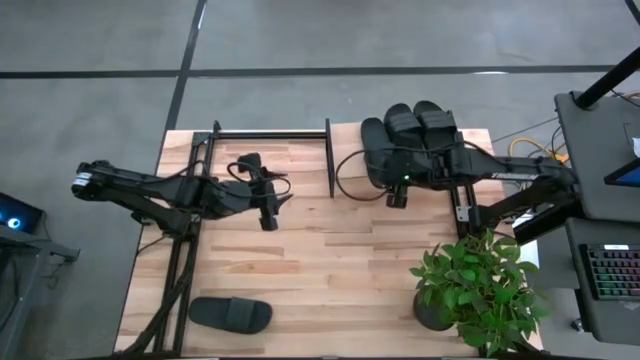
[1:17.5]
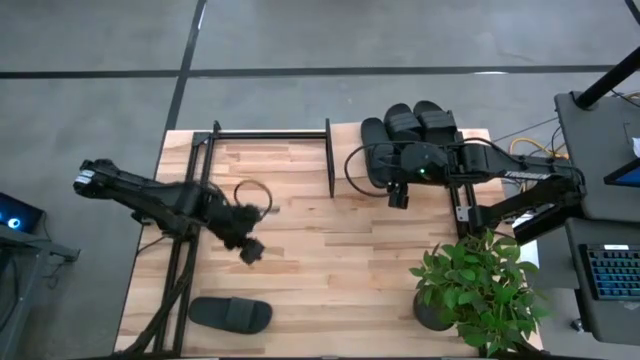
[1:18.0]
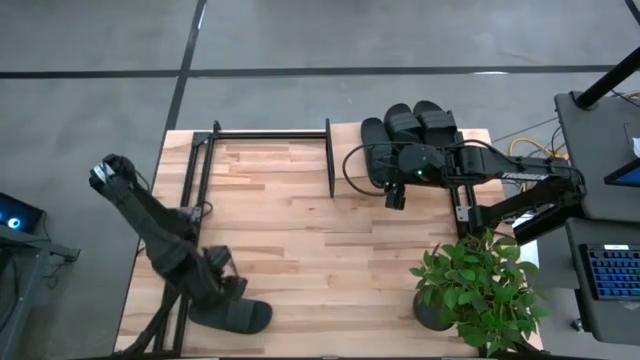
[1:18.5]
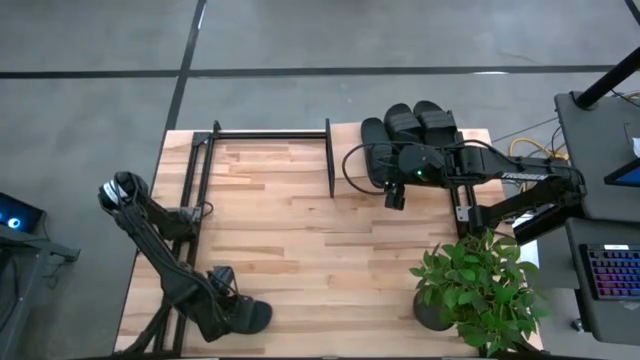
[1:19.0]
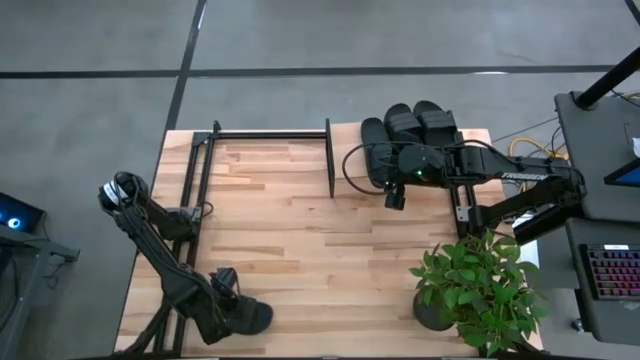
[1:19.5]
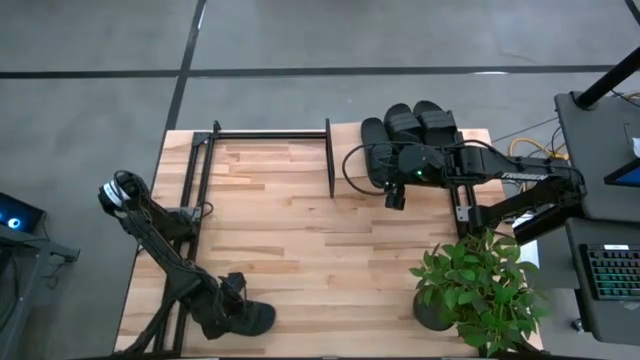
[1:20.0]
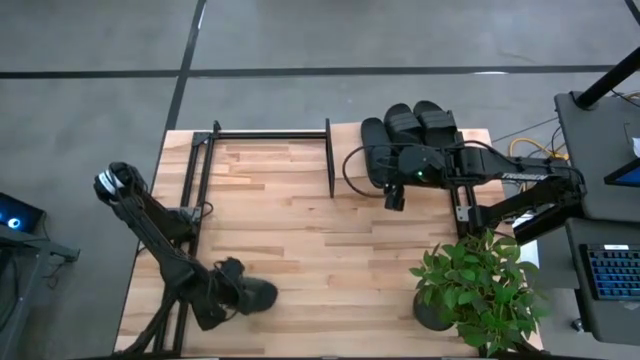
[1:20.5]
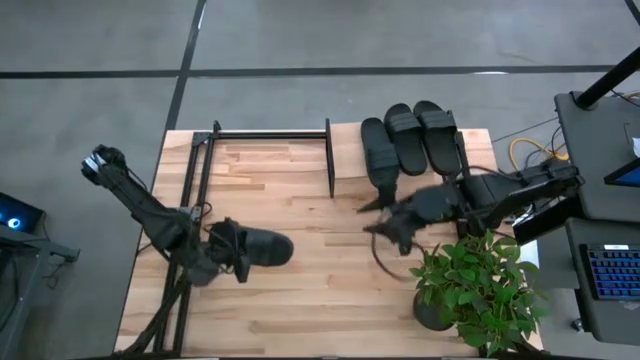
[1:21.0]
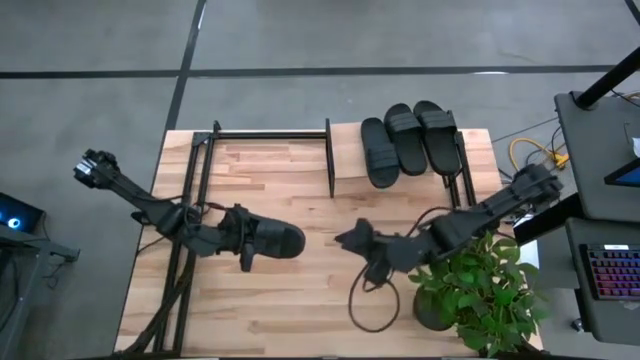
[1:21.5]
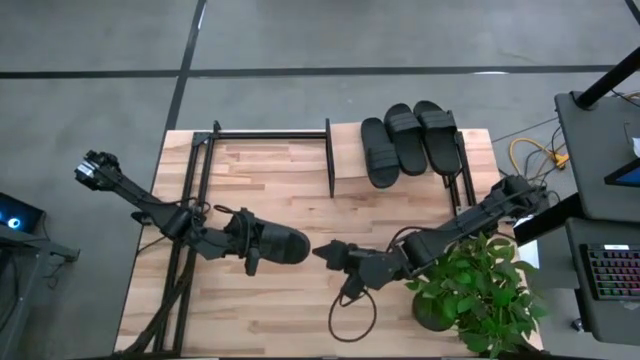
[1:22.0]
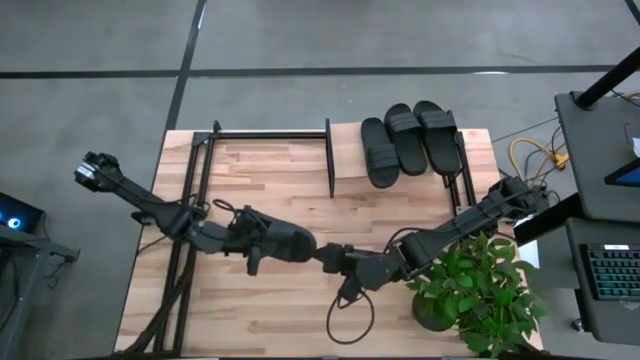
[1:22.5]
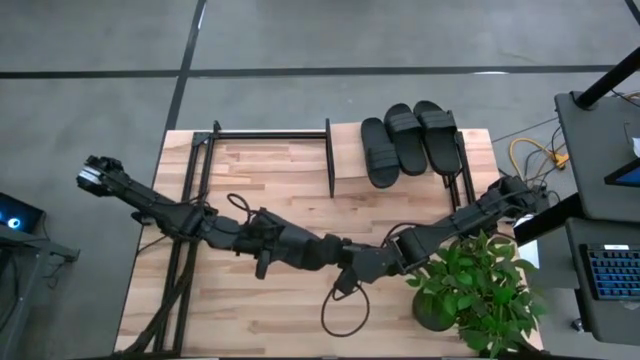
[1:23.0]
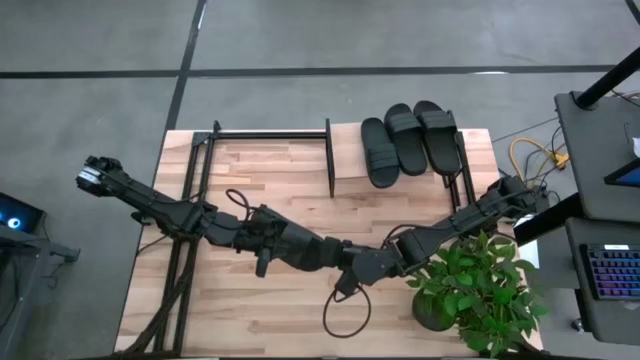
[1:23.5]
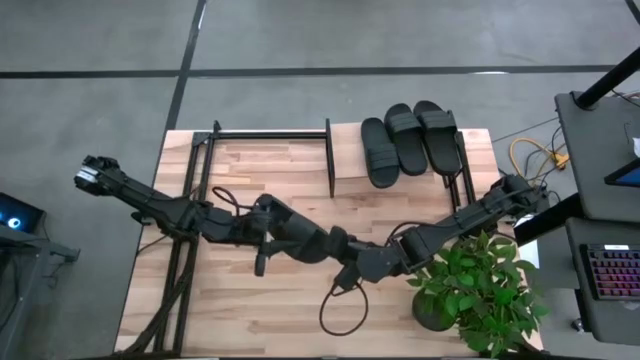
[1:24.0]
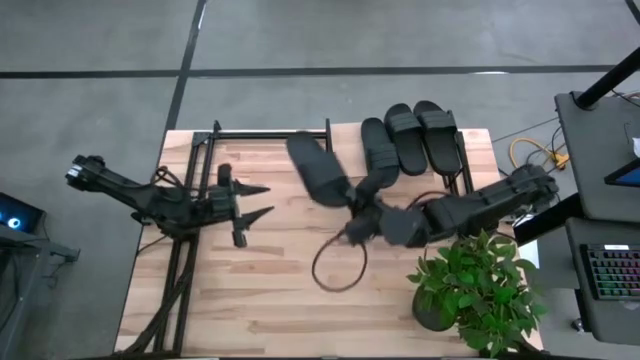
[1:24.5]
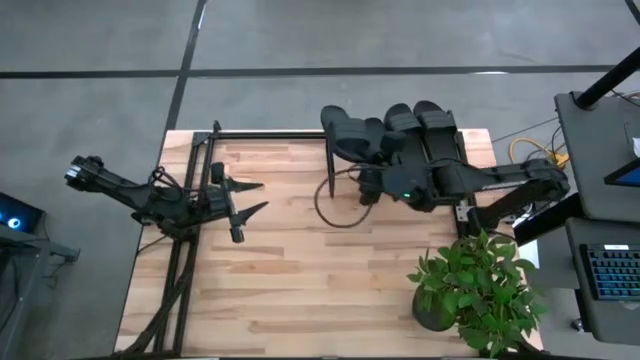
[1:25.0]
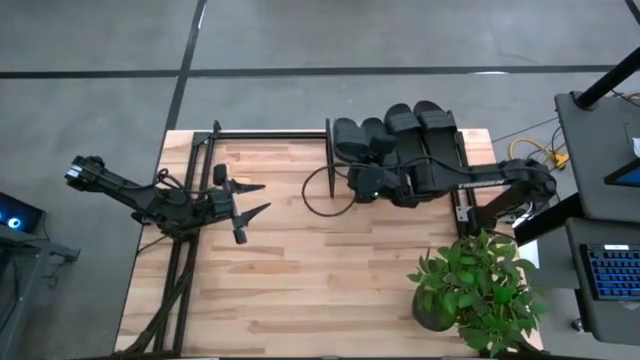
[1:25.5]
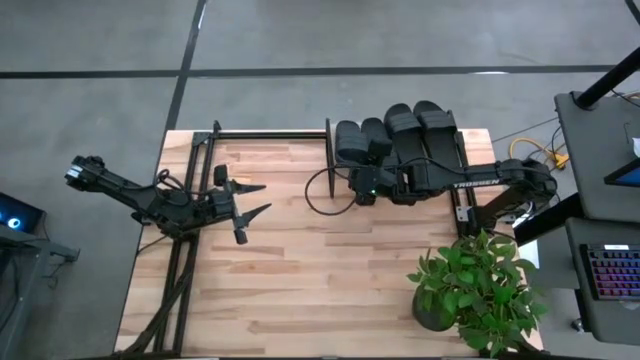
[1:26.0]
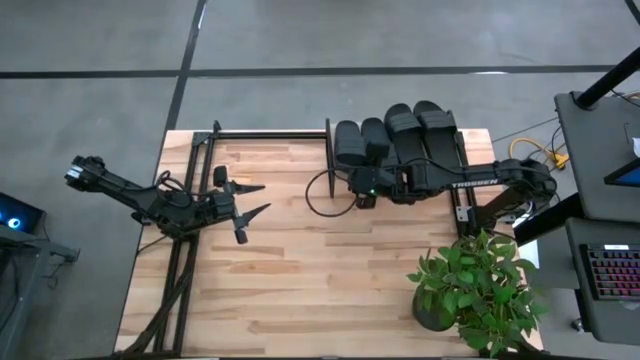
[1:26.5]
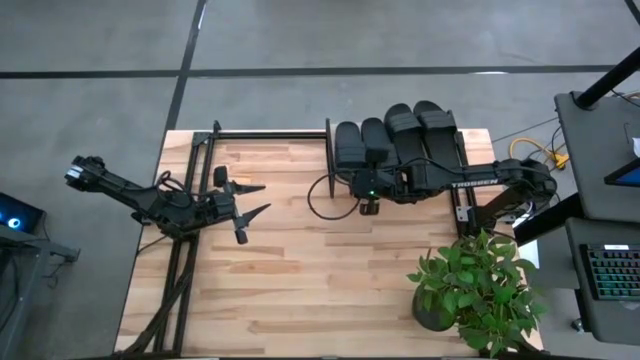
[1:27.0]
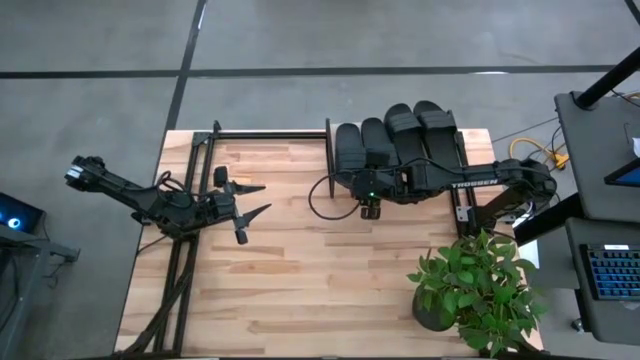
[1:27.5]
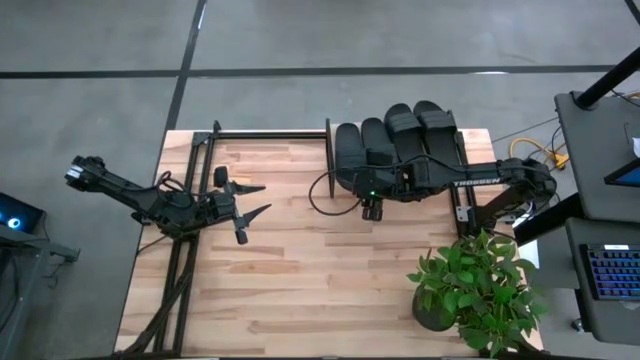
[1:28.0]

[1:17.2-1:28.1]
Task: Pick and place slides into the shelf
Put the black slipper on the shelf

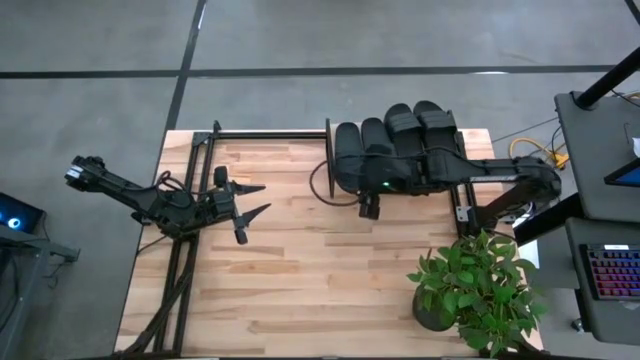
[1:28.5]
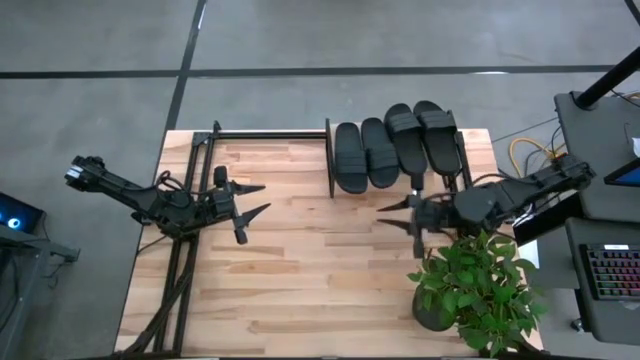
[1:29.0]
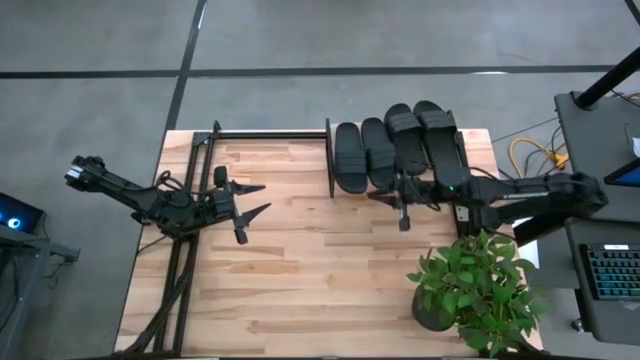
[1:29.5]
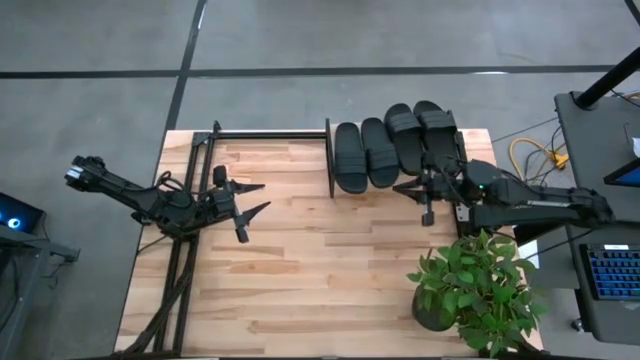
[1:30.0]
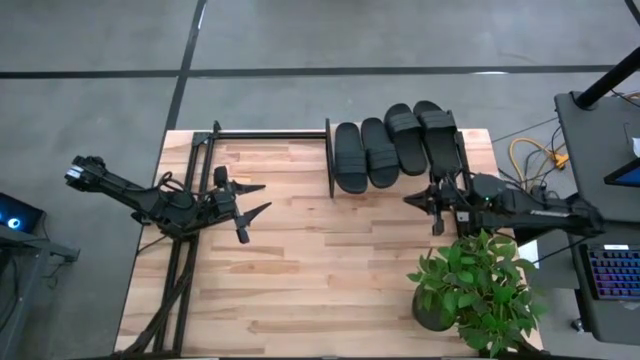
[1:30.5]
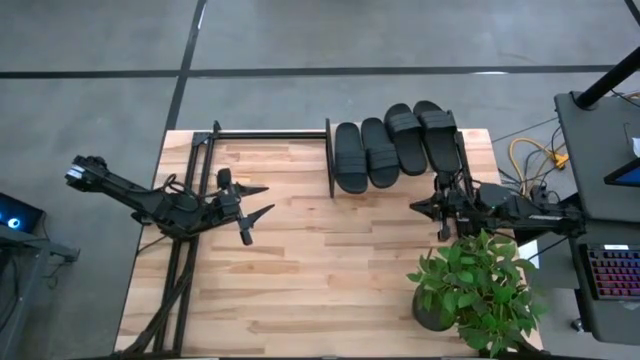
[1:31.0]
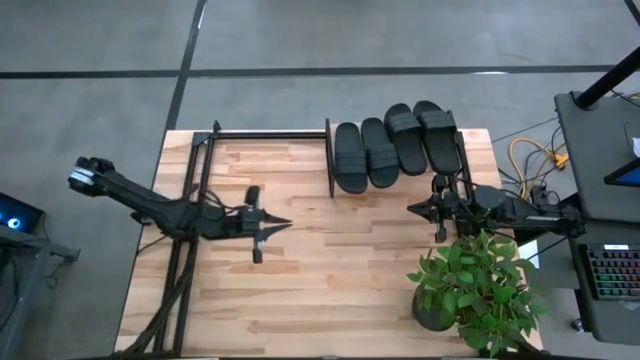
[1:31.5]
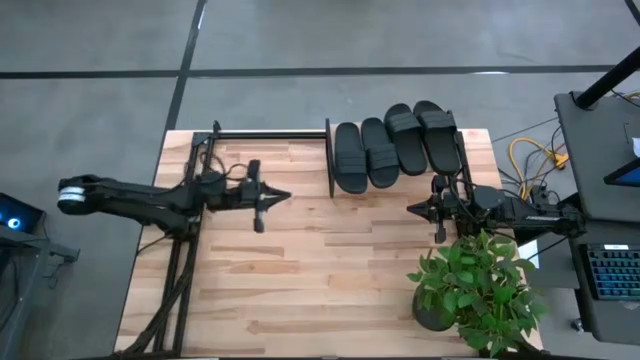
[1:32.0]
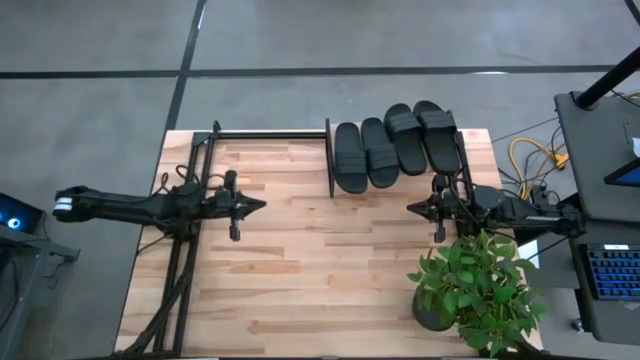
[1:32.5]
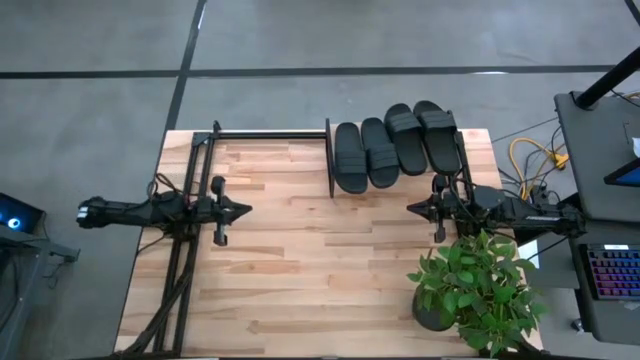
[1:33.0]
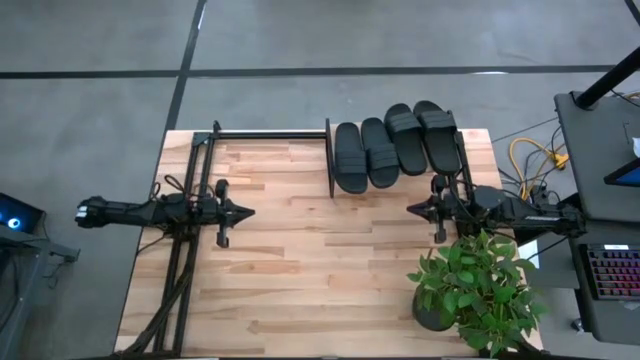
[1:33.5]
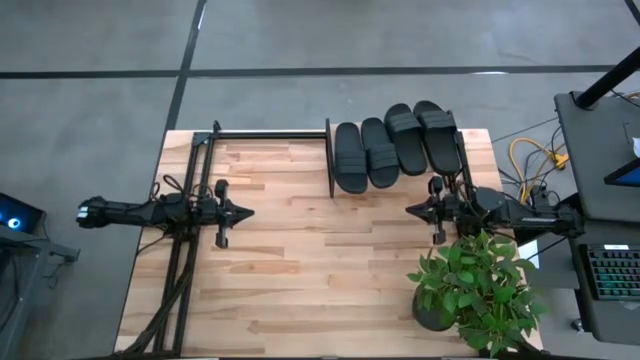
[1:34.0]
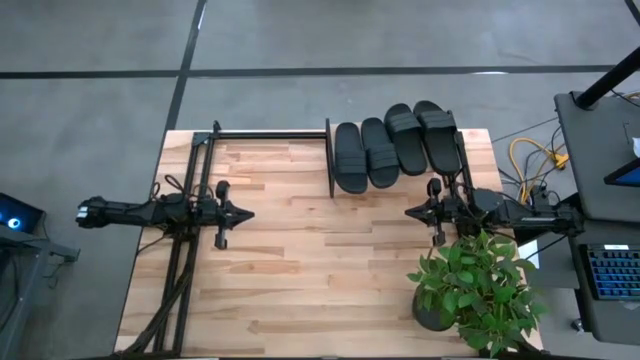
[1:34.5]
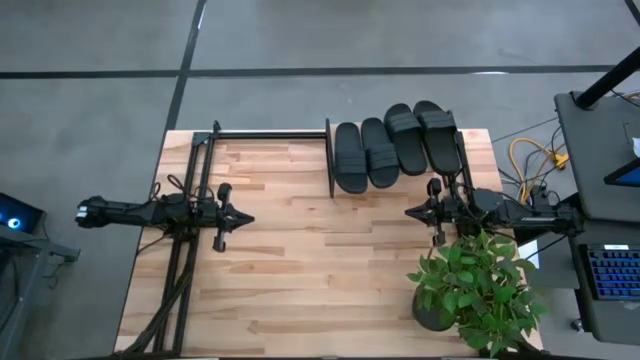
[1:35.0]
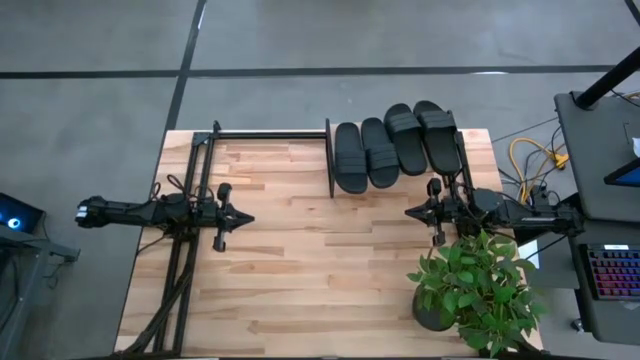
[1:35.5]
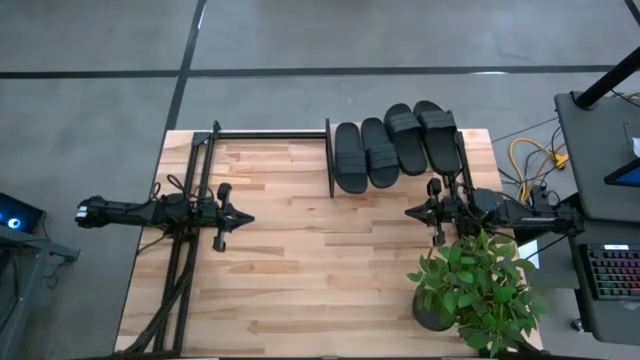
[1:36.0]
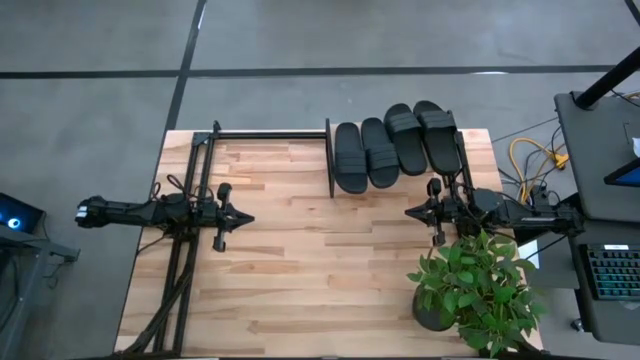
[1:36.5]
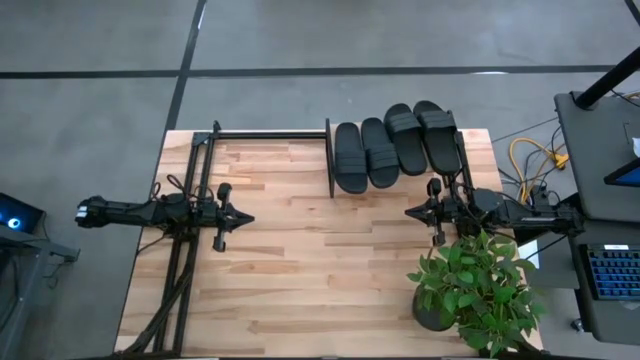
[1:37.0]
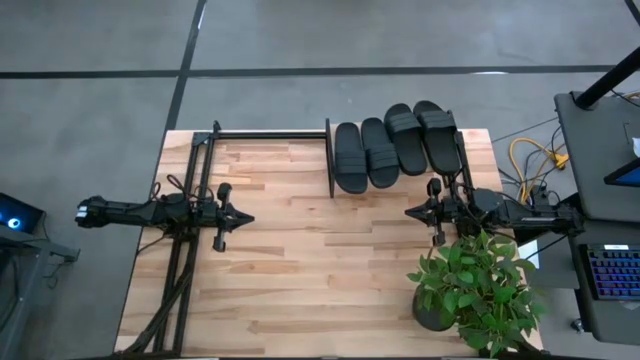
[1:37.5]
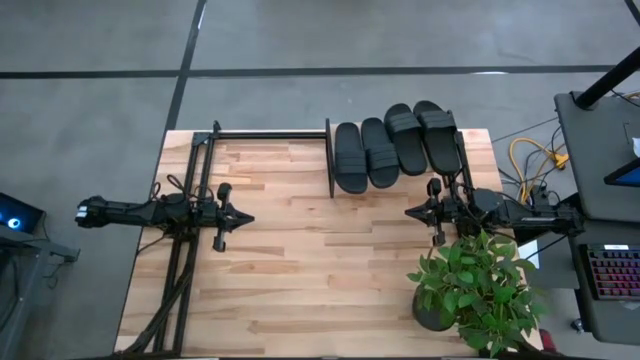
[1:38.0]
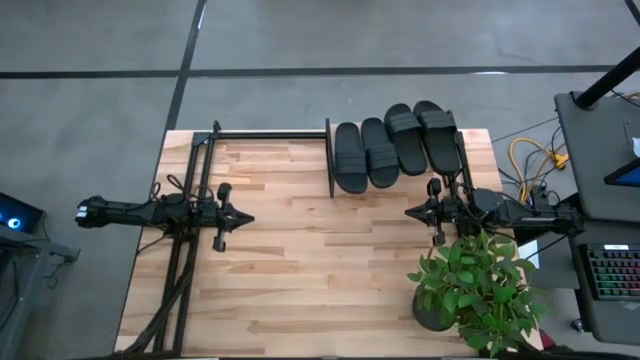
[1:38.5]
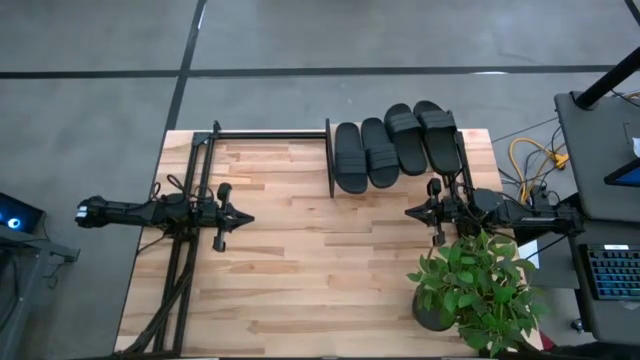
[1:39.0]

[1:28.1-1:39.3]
Return to Home Position
